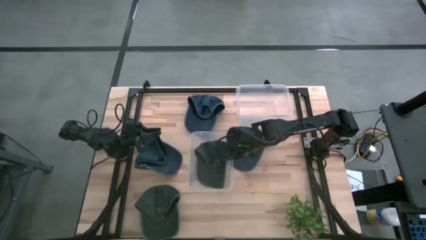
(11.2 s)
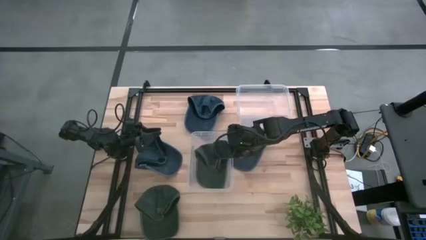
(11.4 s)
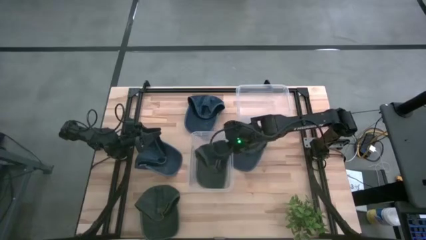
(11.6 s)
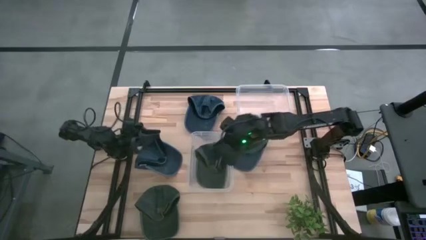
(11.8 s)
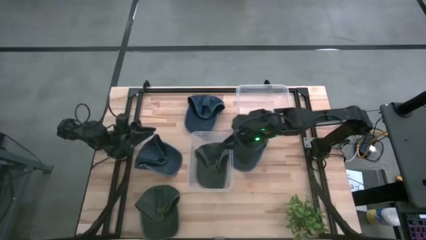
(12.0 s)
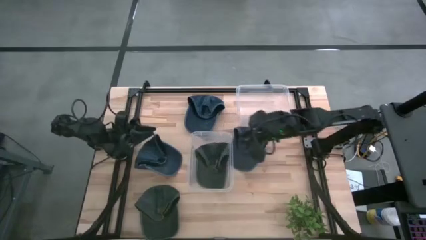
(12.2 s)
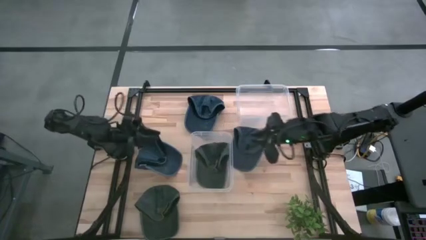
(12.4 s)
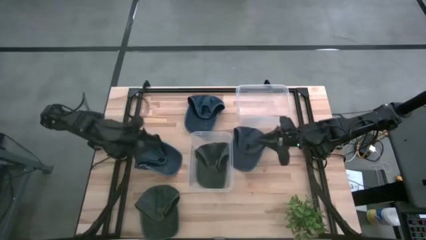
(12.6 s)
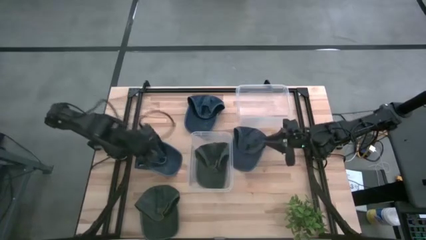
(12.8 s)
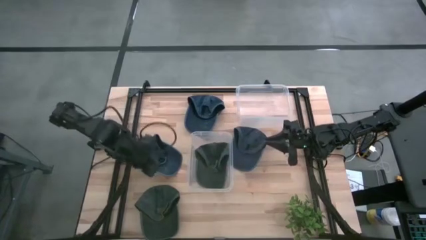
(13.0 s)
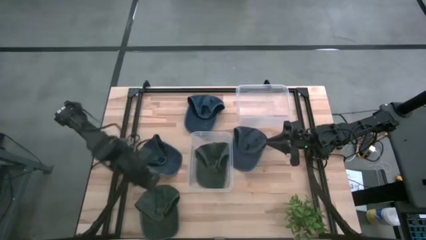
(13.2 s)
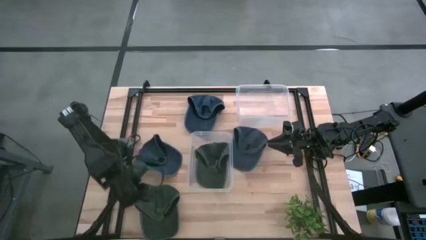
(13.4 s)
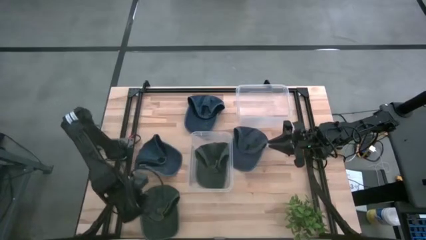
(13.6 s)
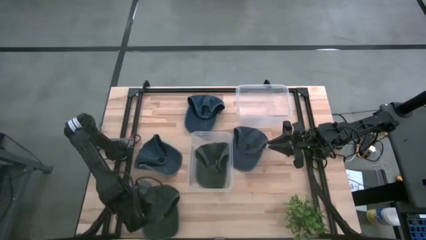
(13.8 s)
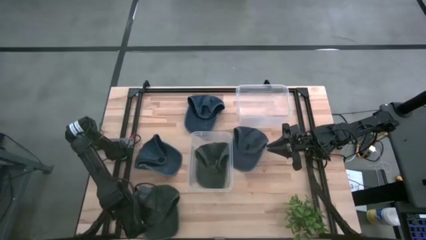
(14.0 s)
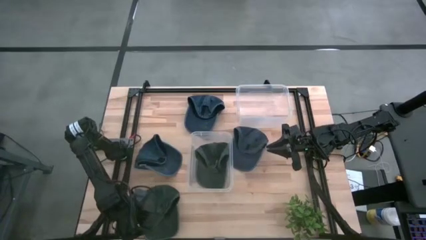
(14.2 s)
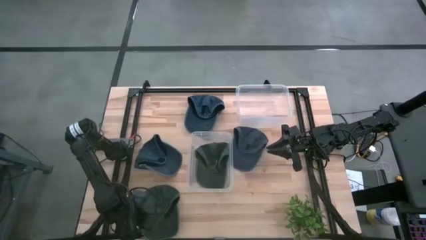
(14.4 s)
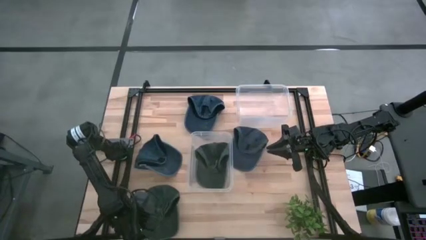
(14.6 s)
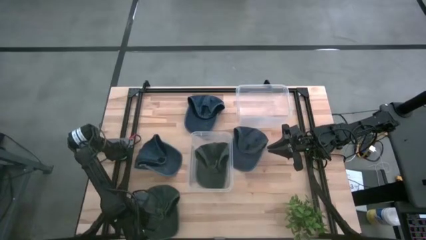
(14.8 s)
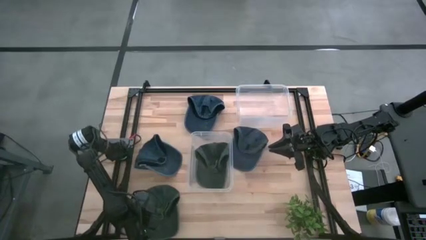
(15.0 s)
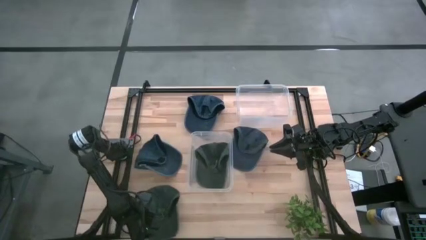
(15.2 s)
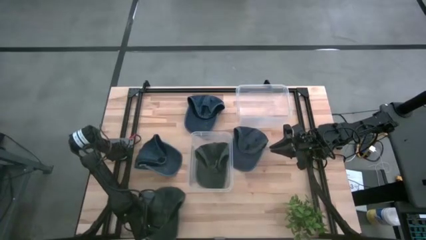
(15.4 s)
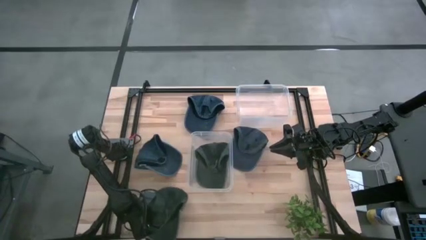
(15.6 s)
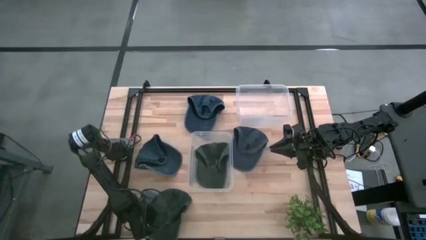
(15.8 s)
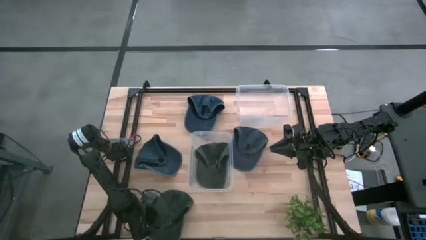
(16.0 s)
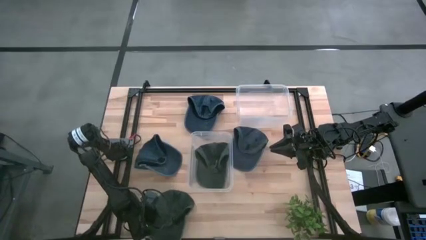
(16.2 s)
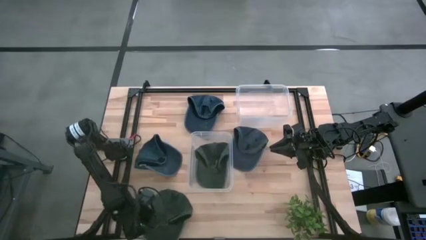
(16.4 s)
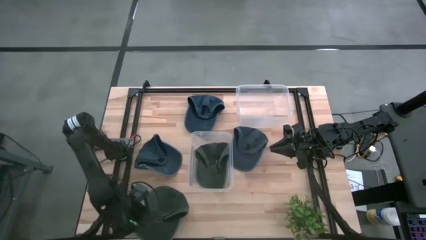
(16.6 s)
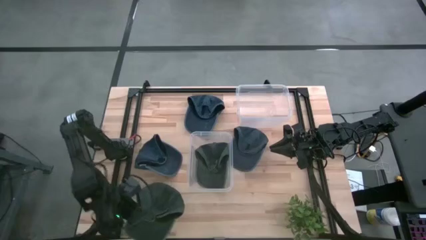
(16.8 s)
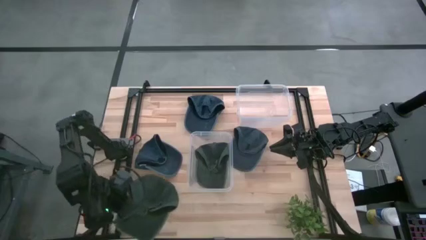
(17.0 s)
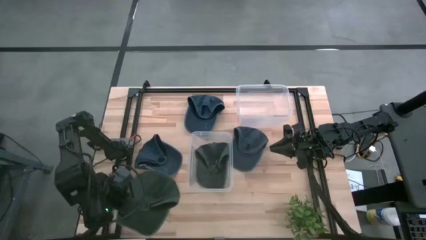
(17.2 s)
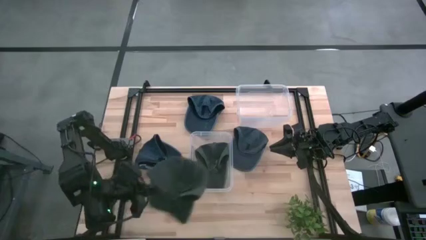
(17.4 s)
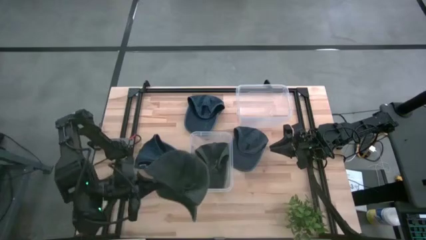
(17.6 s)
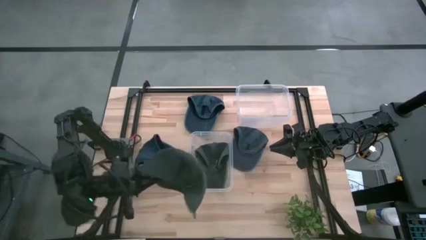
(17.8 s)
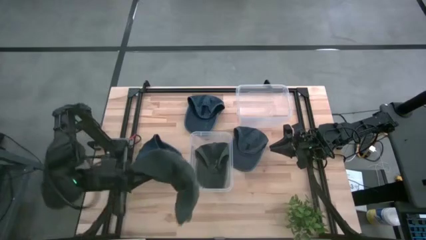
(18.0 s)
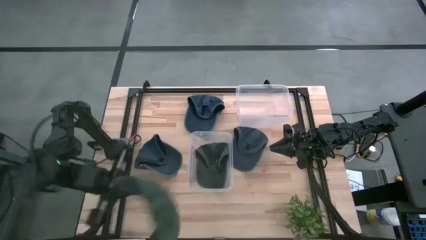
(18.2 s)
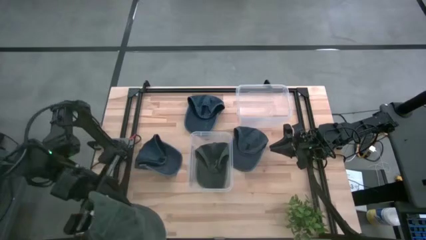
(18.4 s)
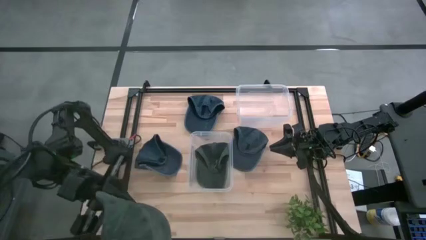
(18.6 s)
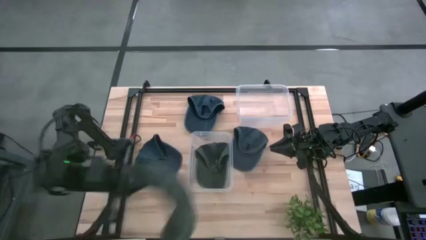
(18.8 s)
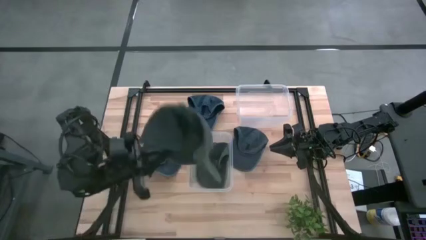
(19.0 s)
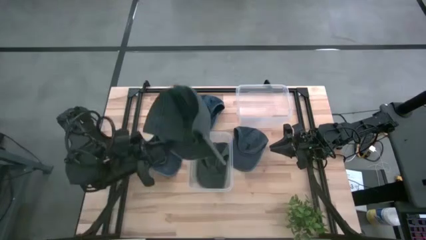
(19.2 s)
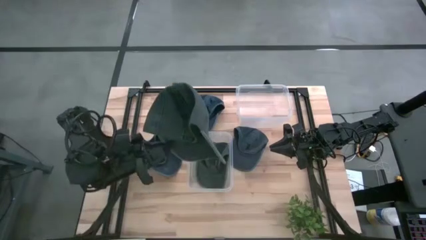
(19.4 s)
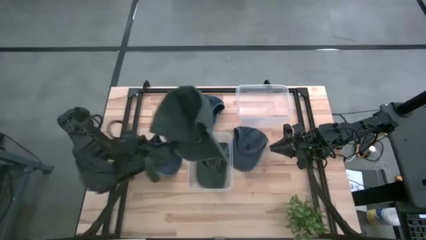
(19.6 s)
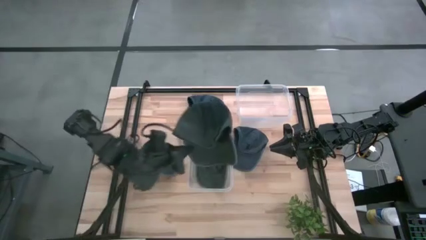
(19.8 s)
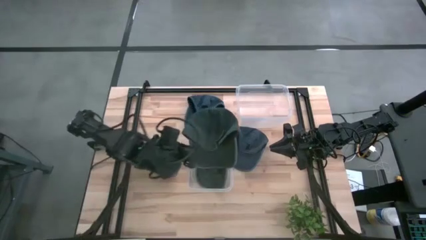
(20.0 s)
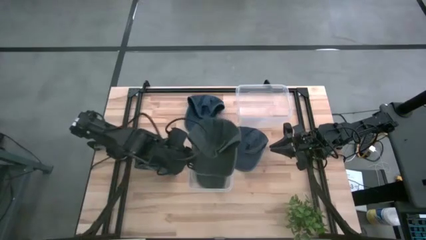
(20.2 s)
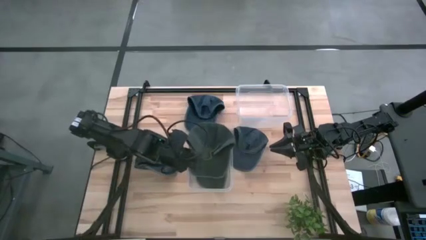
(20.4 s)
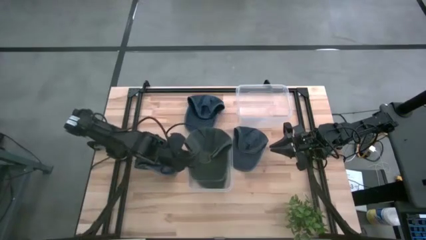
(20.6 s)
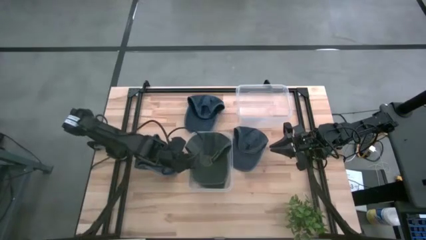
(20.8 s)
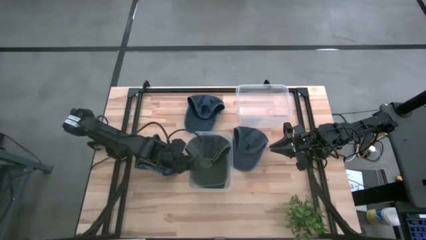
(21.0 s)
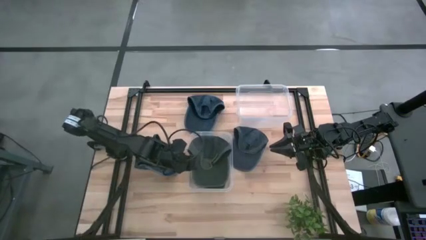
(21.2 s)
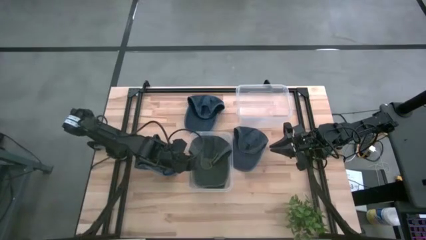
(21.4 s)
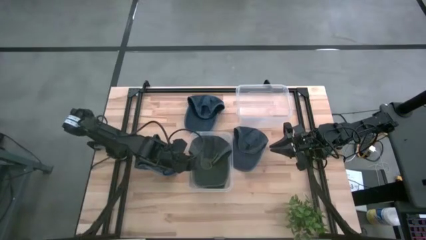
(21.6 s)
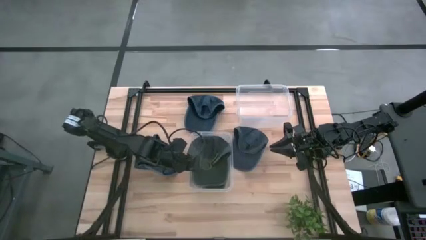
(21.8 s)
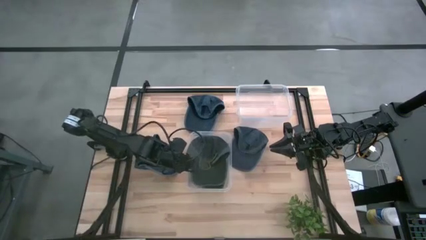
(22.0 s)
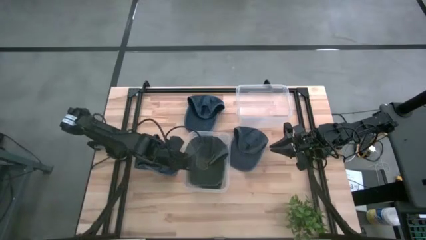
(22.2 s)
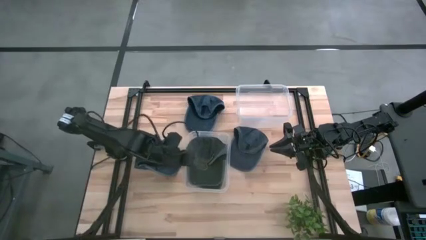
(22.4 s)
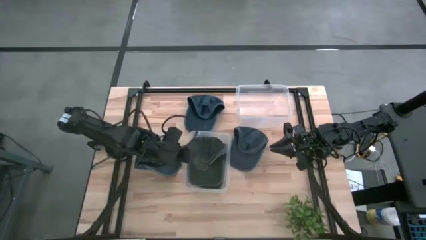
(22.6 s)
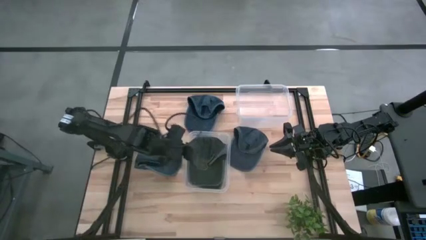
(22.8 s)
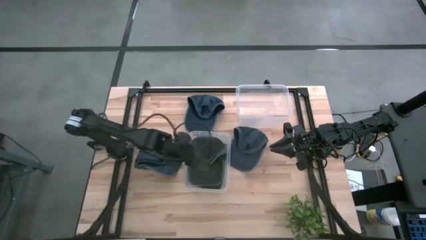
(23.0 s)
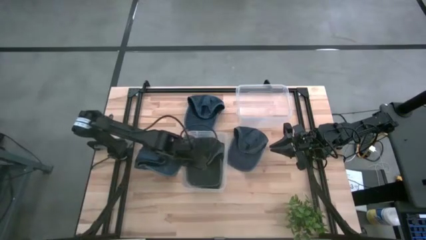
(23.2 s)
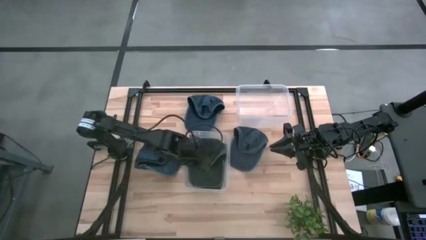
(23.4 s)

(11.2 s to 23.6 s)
Task: Pick & Place hat
Put the black cap into the bottom transparent bin

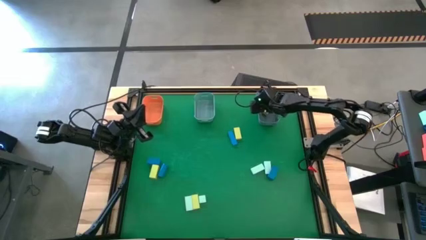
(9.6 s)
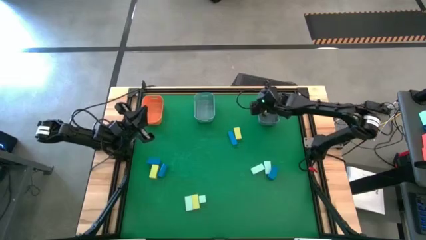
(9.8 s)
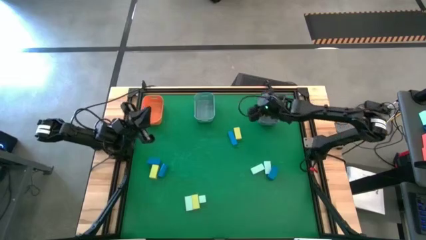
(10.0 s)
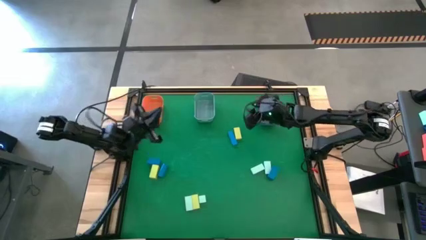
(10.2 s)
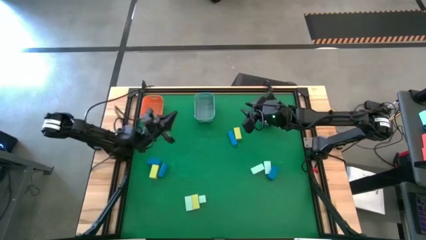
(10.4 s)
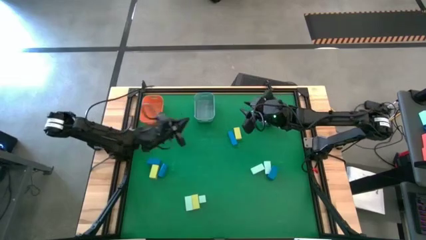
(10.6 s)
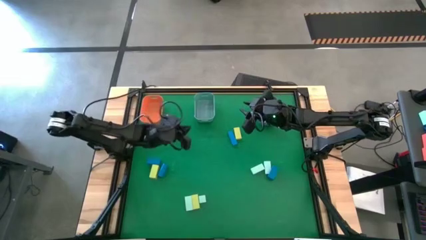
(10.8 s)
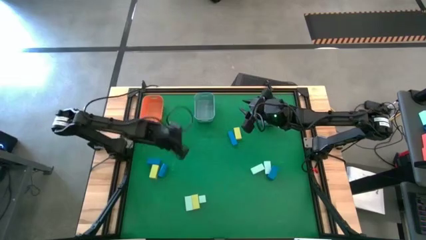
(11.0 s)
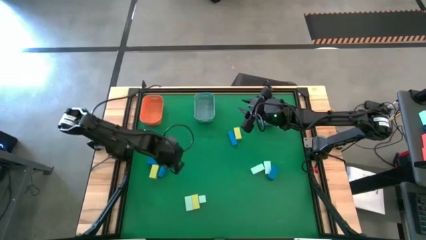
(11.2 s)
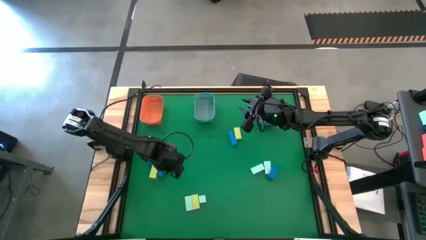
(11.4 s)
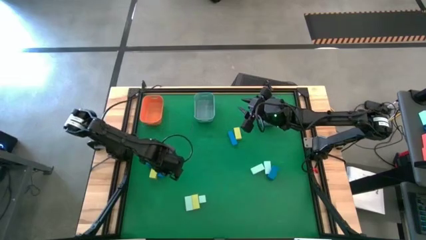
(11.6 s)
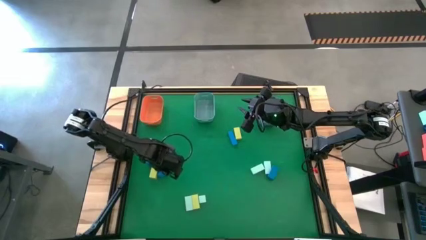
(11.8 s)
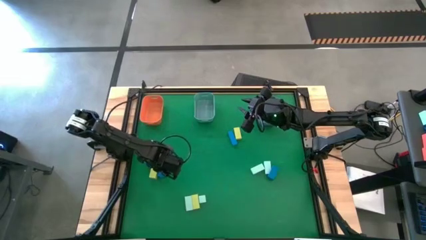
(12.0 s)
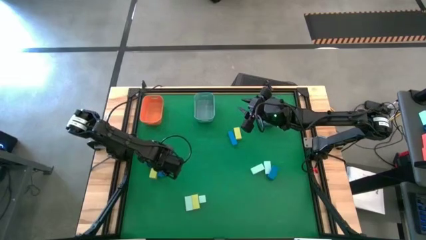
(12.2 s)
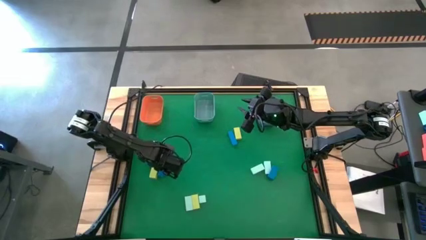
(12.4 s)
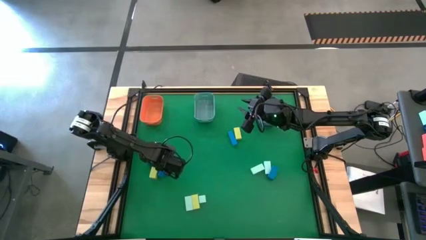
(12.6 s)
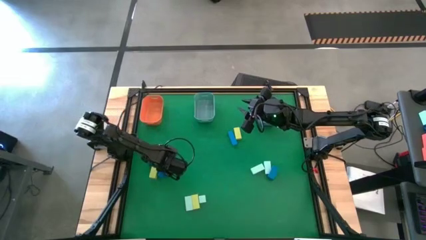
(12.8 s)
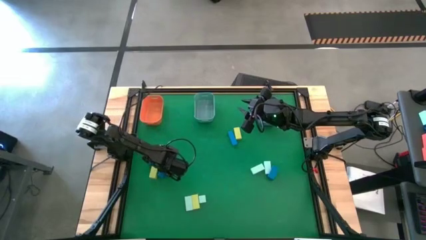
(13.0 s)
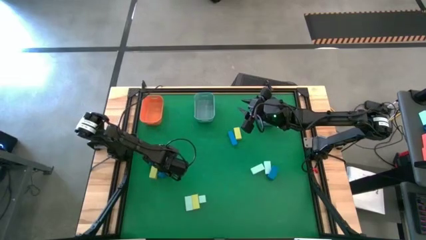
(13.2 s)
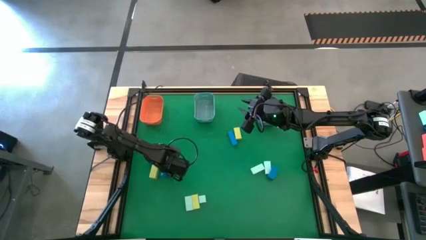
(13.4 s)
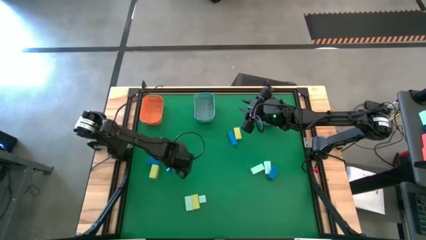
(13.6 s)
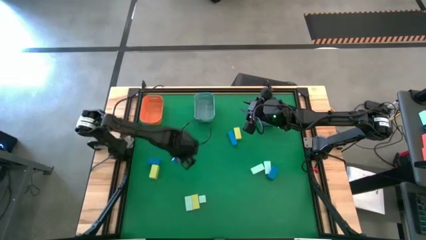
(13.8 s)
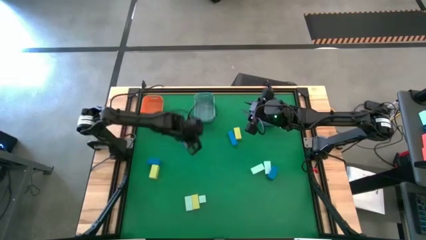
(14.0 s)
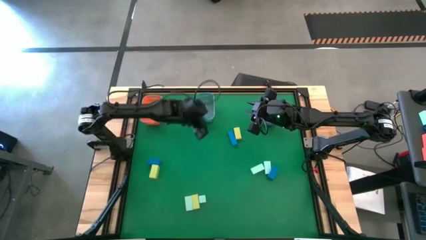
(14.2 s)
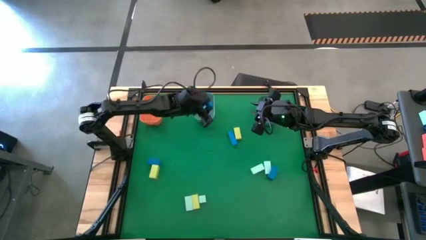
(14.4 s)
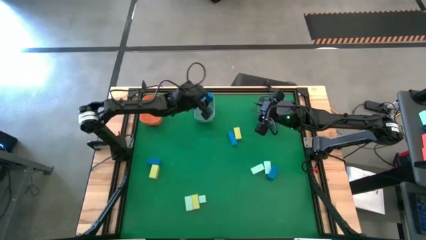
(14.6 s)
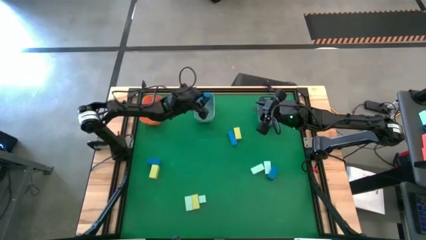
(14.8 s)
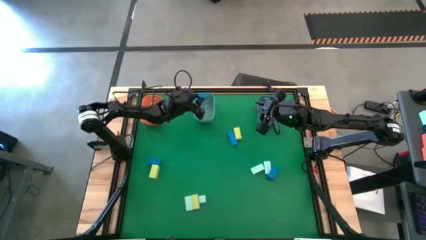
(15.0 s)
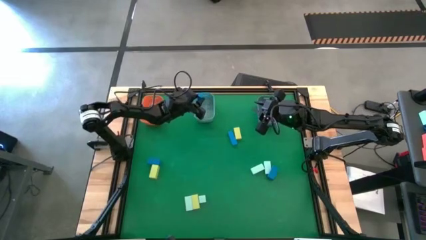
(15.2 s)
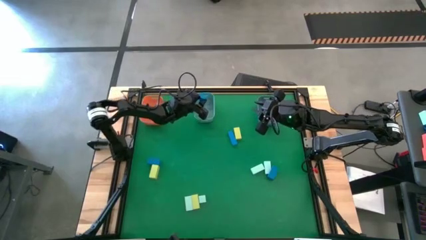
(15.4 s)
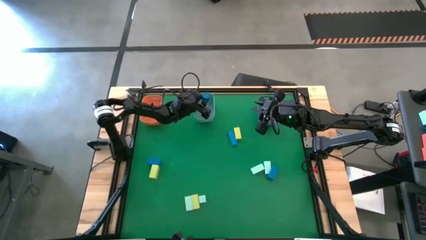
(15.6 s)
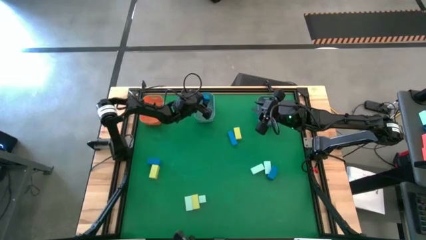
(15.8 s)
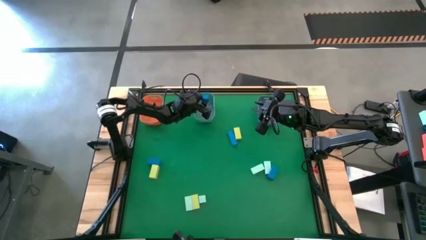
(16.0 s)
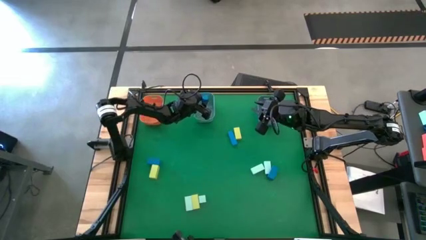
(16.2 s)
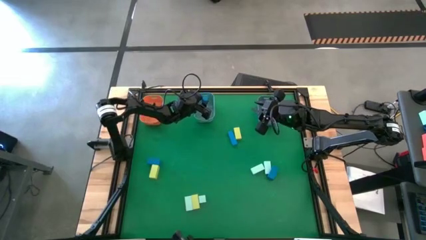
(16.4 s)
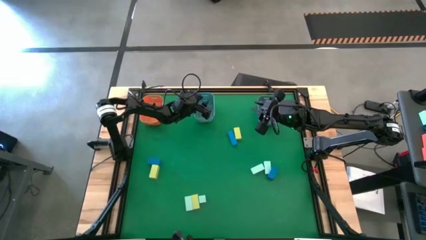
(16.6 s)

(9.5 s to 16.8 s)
Task: Sort & place blocks by color
Put the blue block into the blue bin
